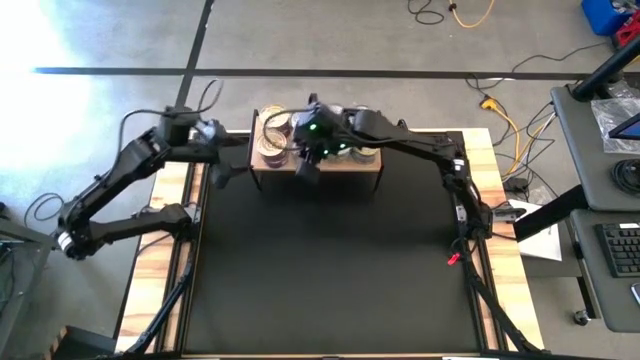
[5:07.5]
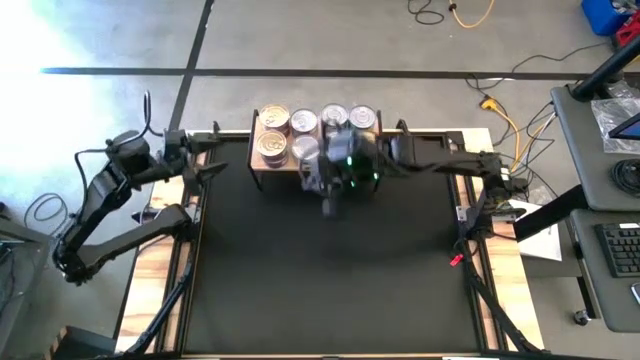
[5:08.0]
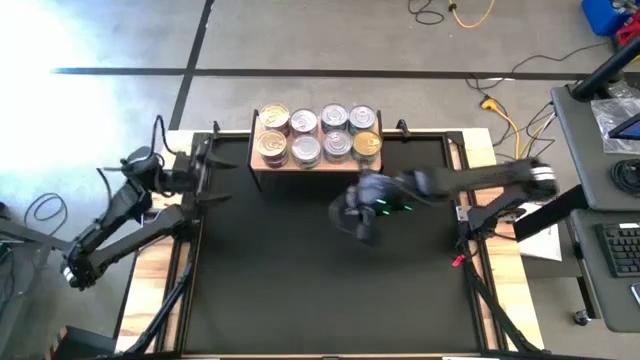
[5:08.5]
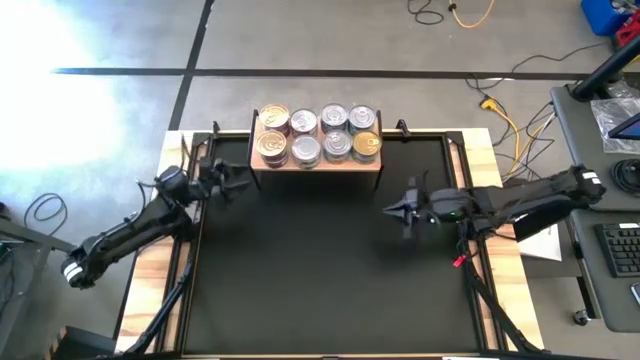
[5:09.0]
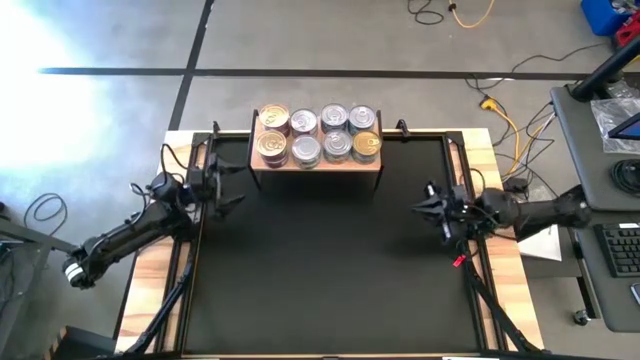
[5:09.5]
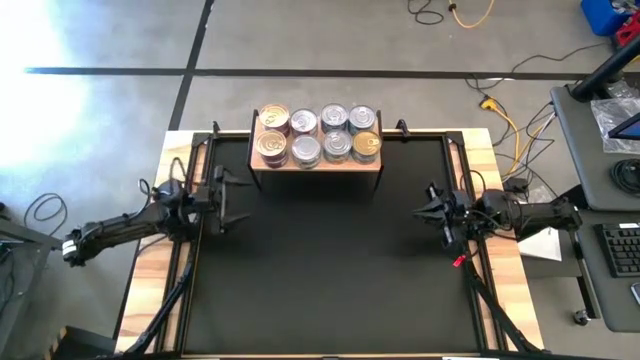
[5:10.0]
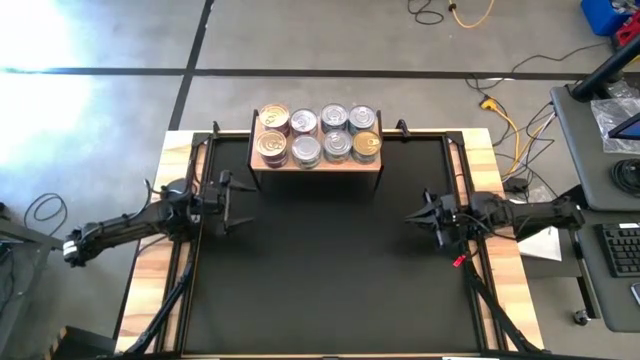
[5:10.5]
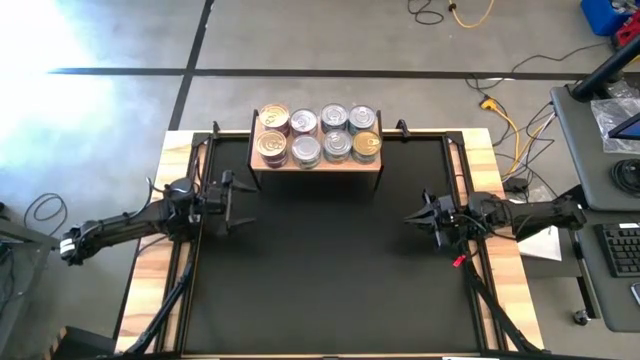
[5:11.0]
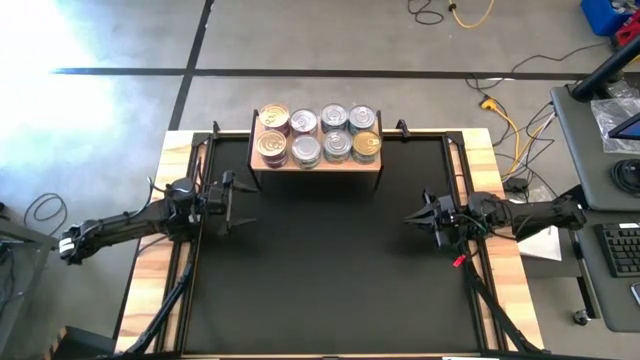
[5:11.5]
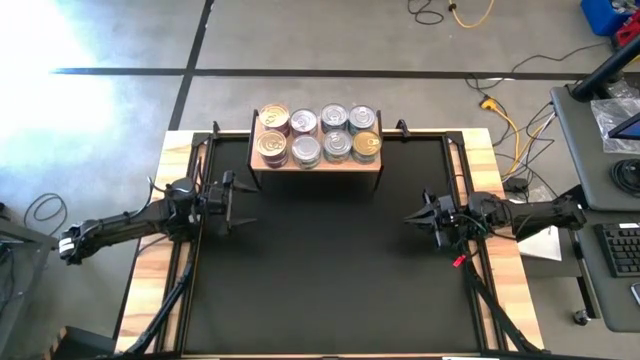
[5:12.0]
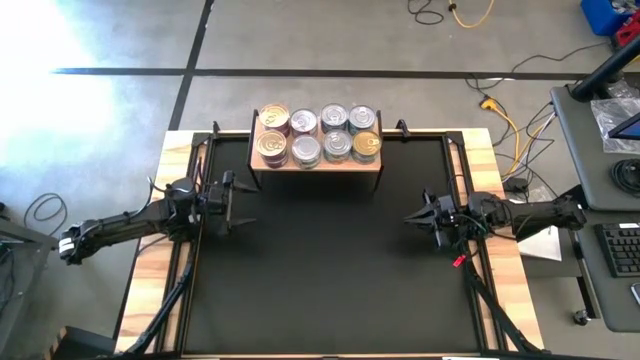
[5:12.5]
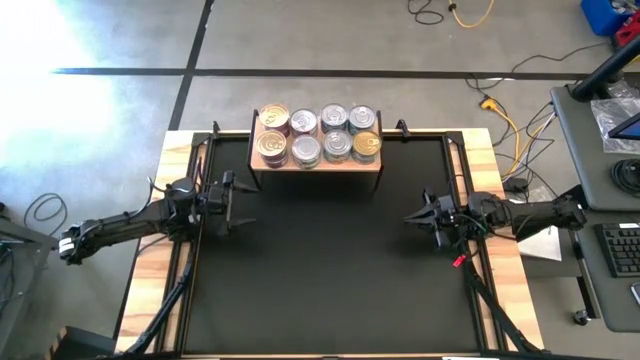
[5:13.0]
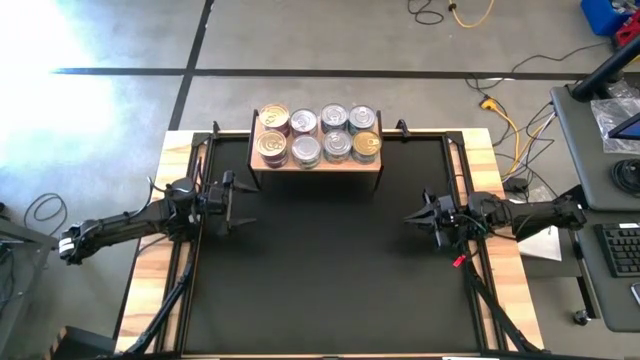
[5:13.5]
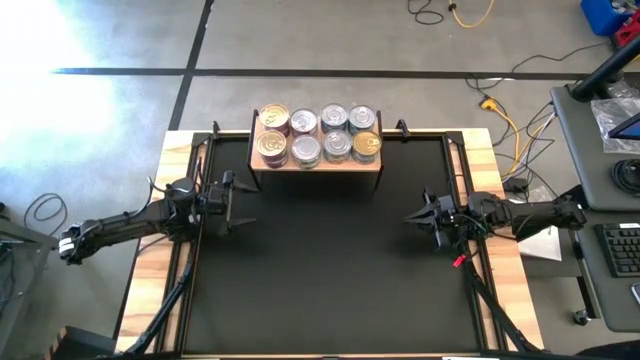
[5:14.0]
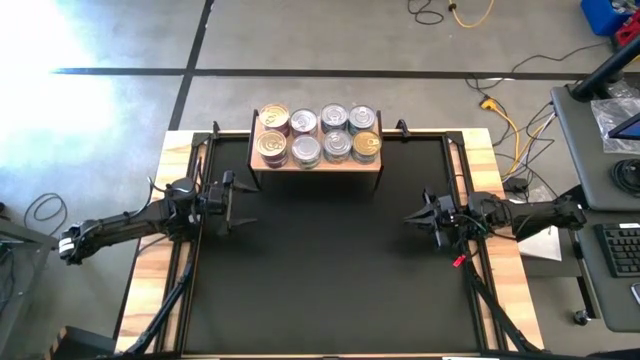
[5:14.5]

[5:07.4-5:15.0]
Task: Stack canned seafood by type on shelf
Return to Home Position

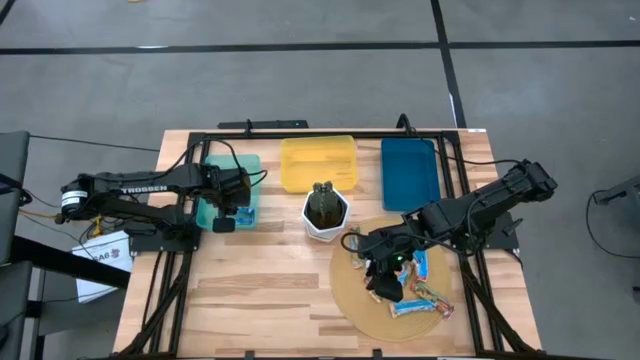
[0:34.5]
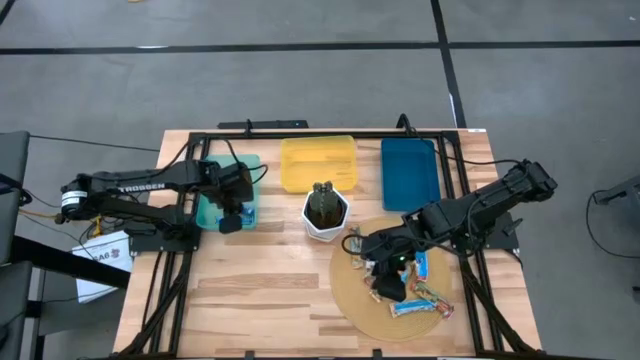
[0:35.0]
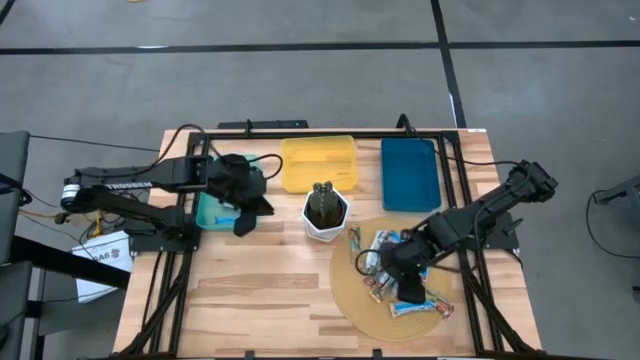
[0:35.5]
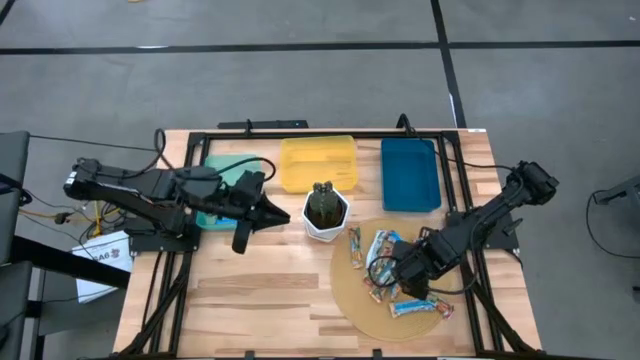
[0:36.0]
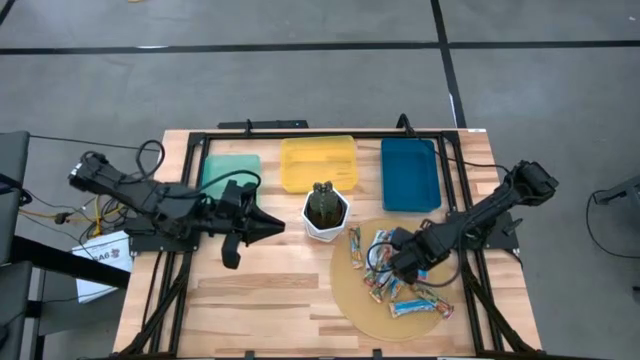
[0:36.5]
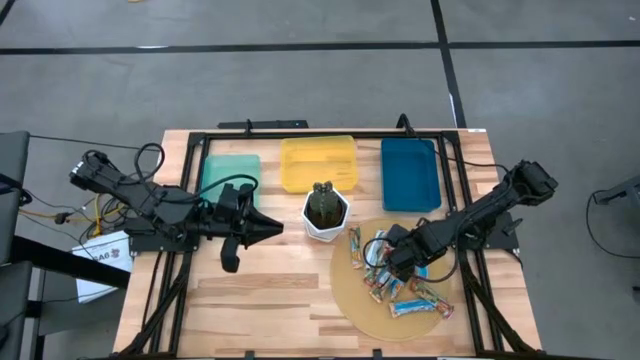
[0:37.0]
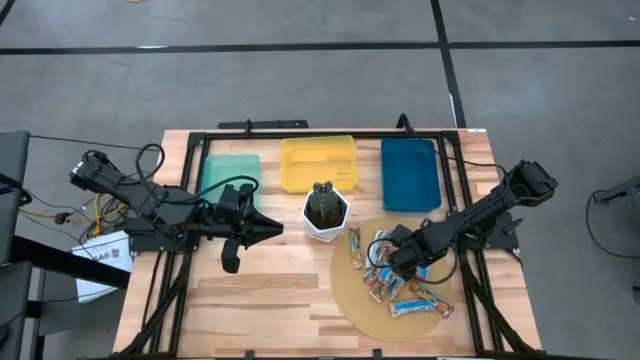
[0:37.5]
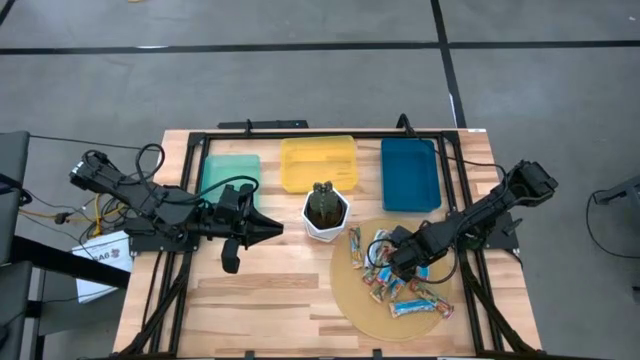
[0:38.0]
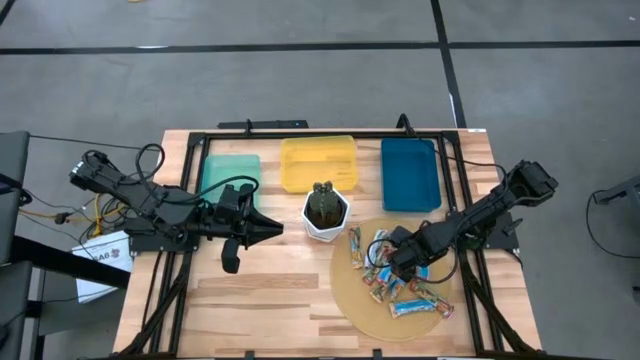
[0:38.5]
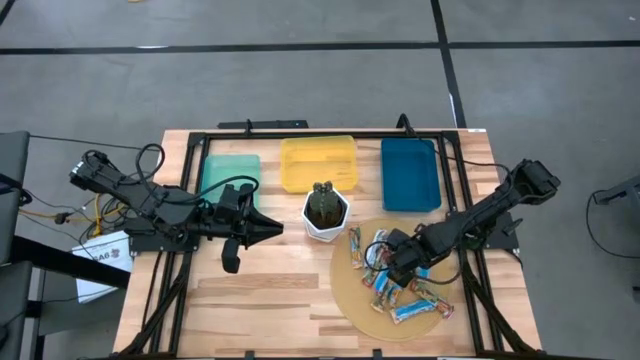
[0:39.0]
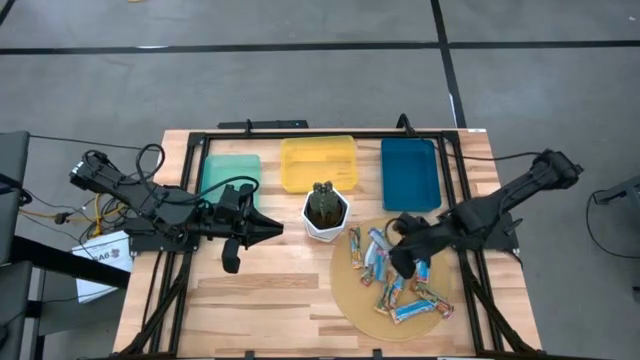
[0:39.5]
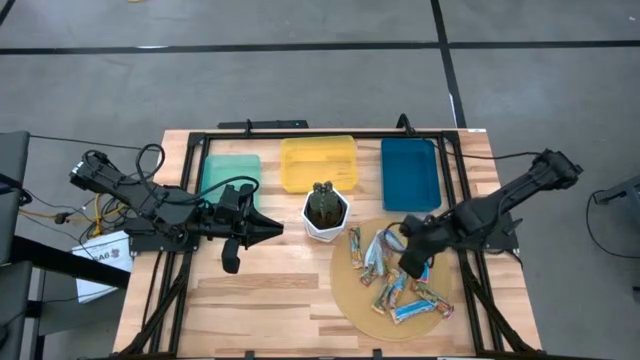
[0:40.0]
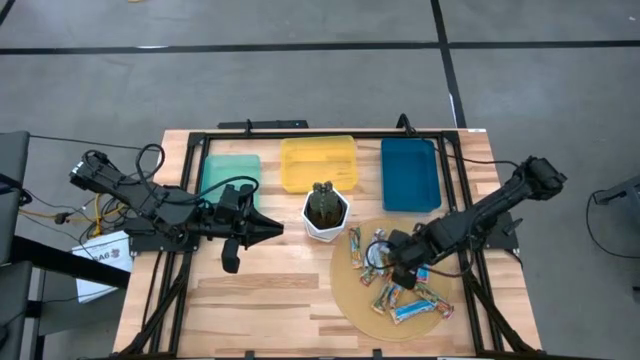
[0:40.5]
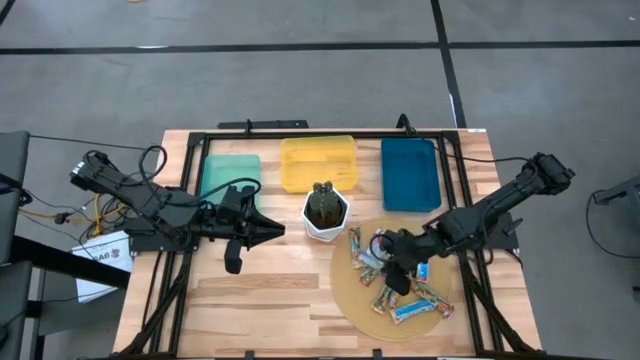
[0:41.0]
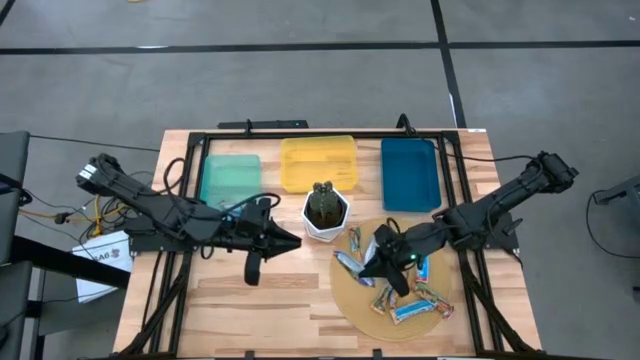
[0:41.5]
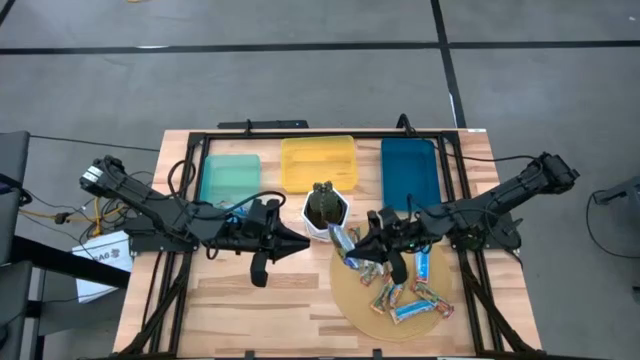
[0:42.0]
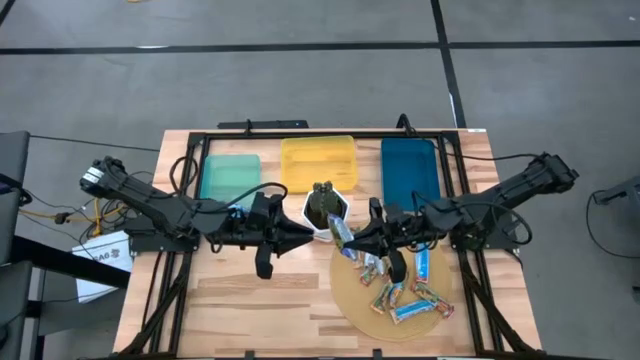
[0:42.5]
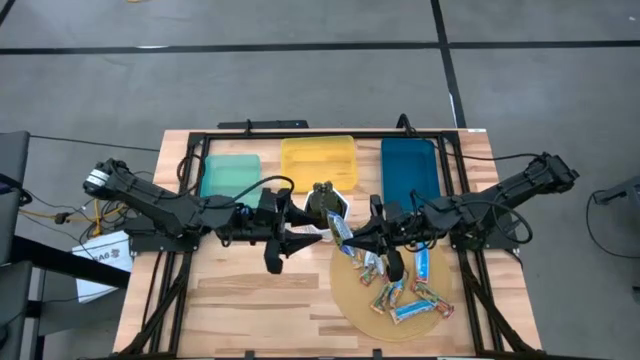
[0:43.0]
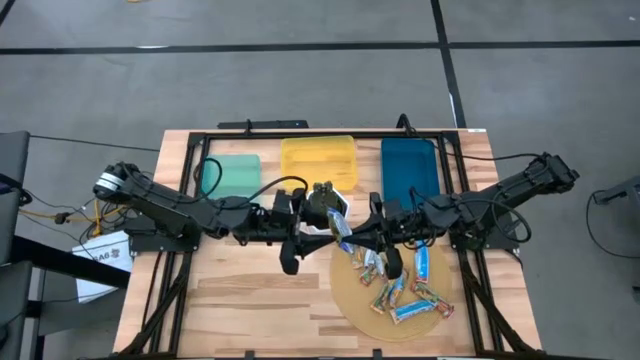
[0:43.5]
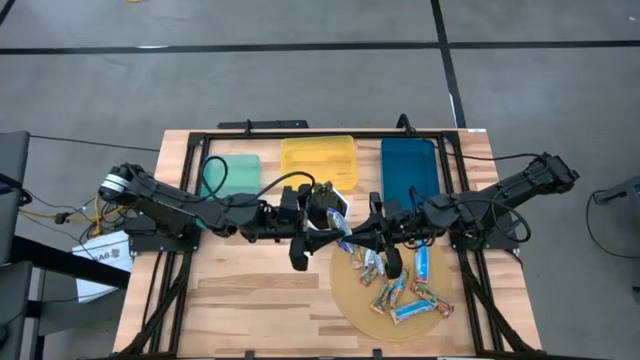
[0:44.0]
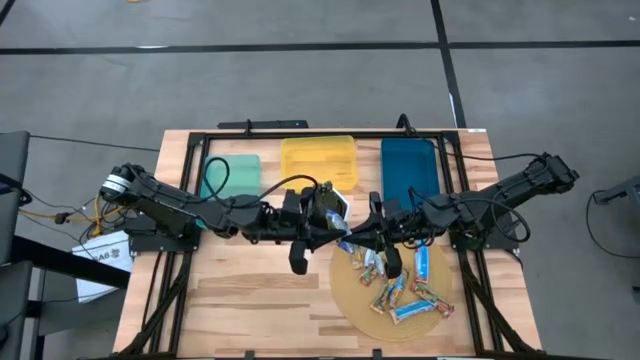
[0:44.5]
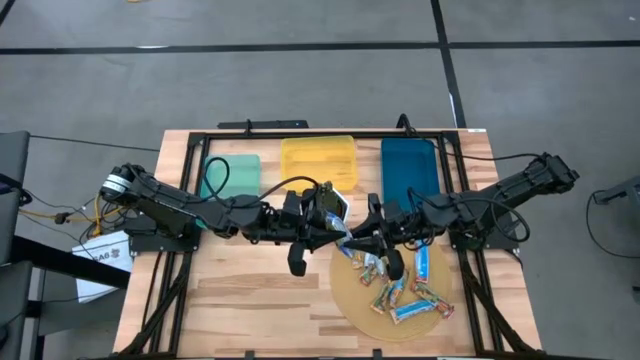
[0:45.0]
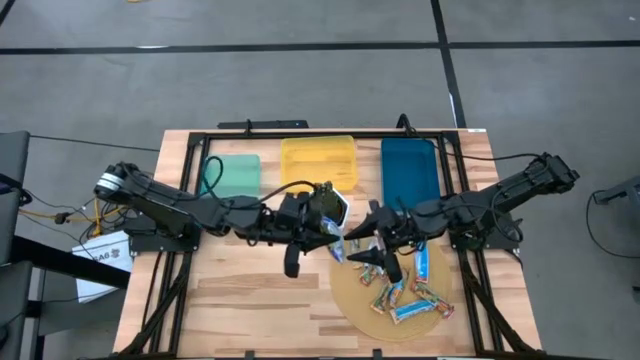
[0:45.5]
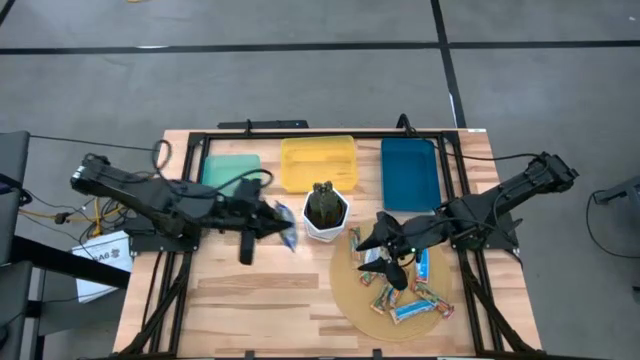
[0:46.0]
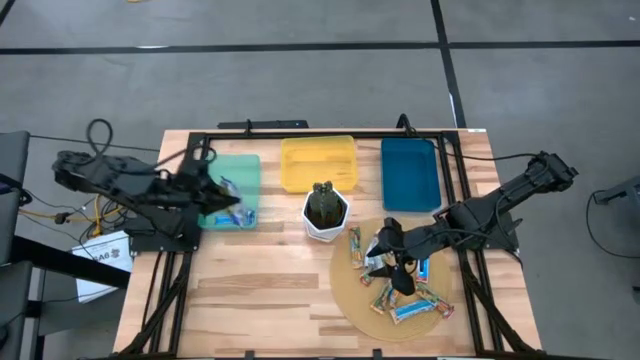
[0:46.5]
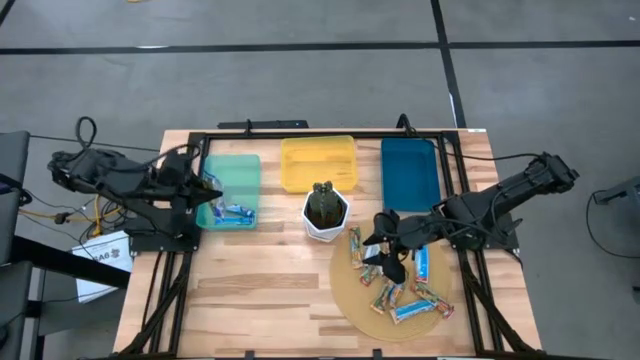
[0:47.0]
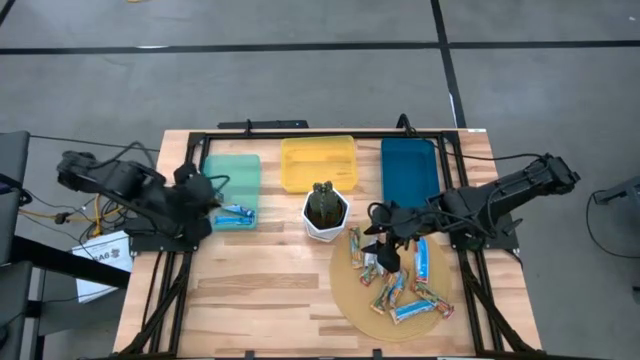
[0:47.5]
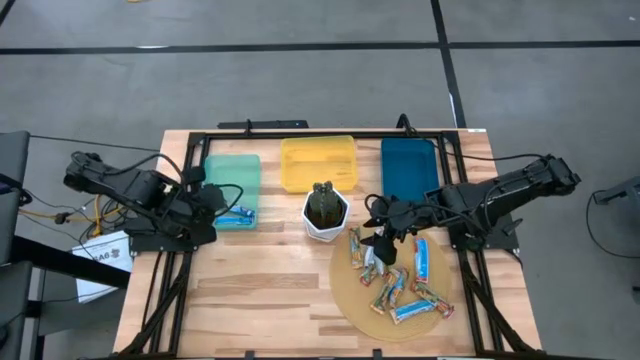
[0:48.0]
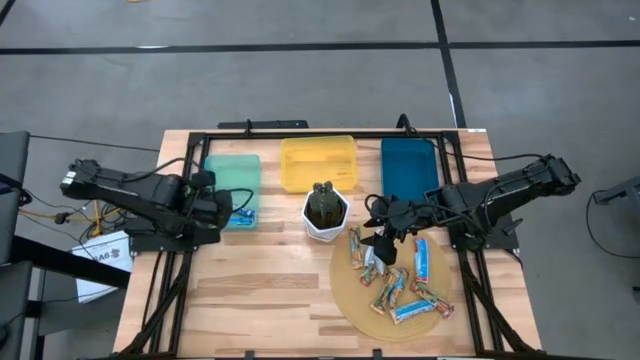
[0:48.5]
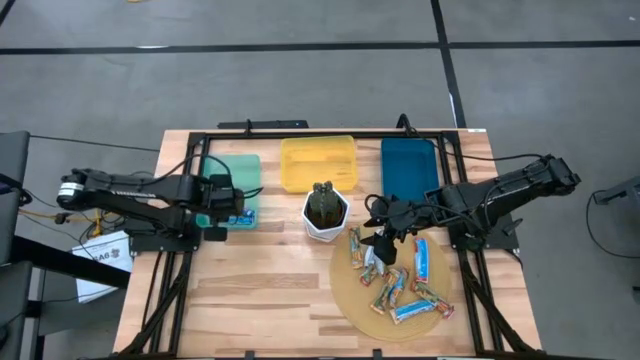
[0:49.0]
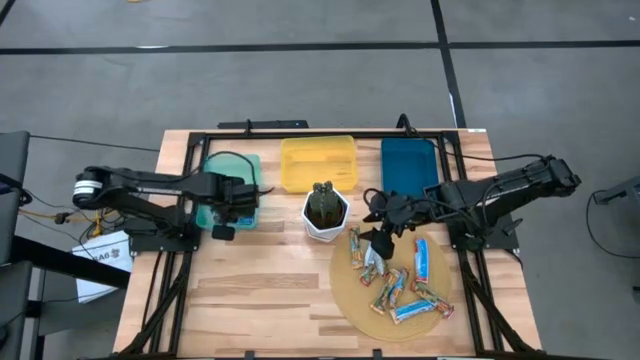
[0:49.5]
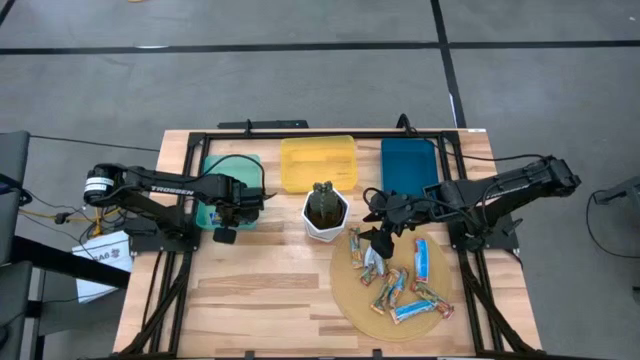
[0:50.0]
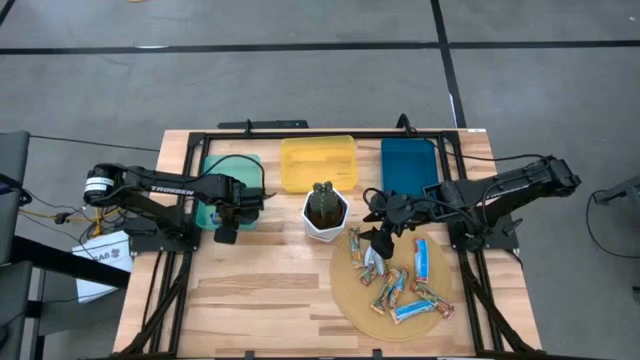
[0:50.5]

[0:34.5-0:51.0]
Task: Pick and place Granola Bars by type
Put the blue granola bar into the green bin
